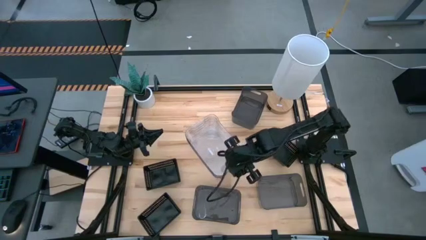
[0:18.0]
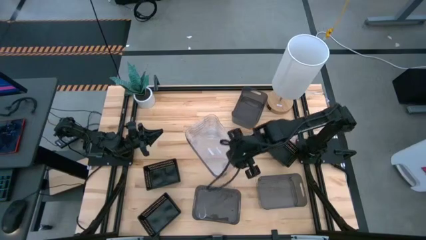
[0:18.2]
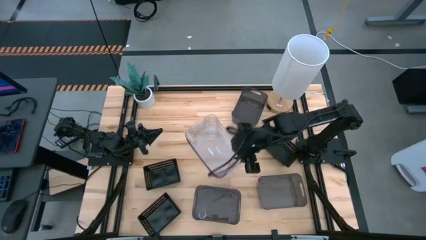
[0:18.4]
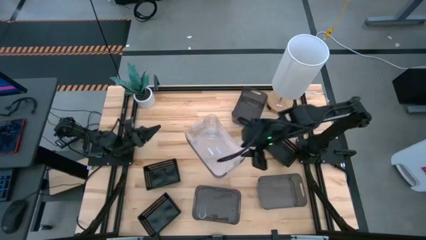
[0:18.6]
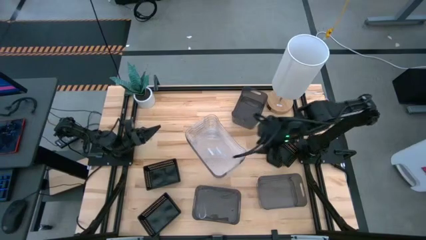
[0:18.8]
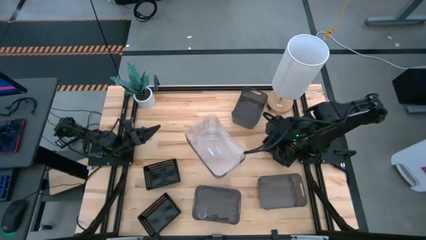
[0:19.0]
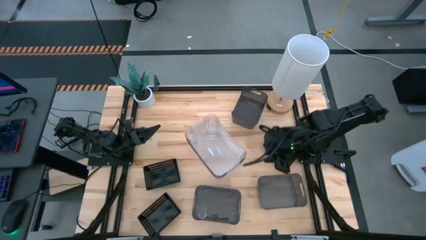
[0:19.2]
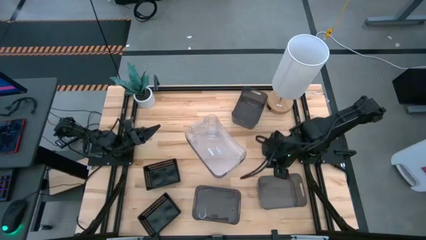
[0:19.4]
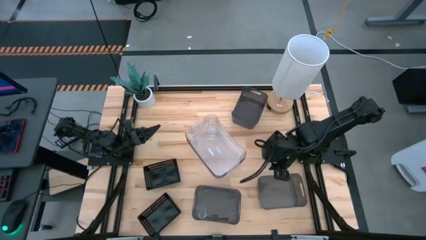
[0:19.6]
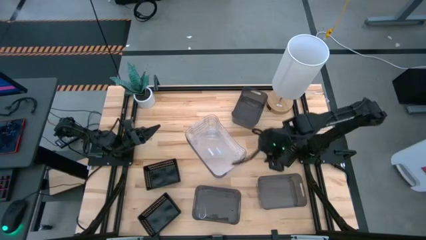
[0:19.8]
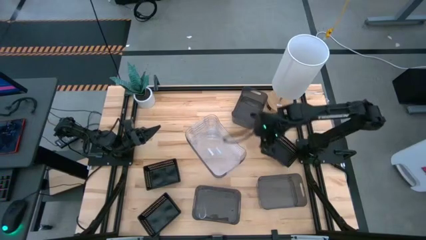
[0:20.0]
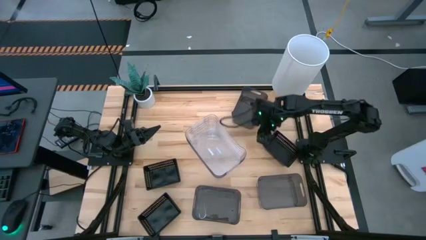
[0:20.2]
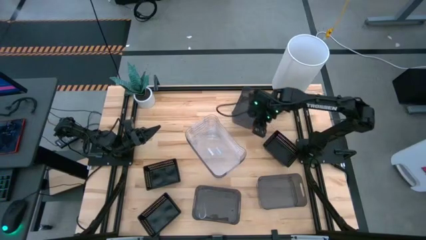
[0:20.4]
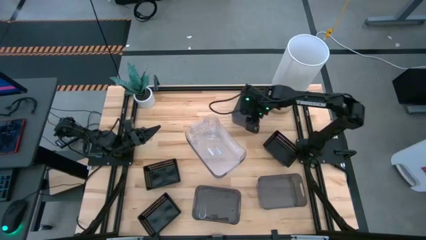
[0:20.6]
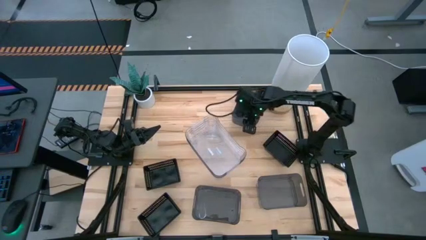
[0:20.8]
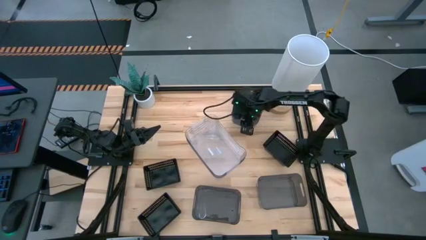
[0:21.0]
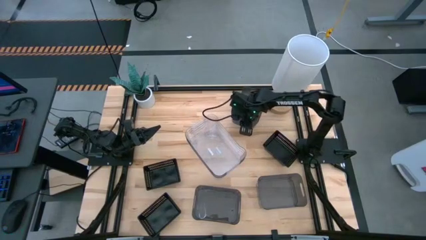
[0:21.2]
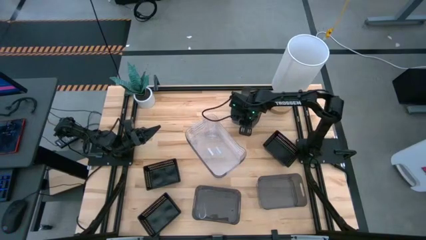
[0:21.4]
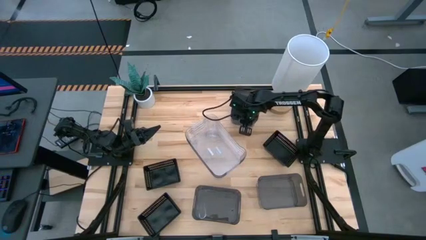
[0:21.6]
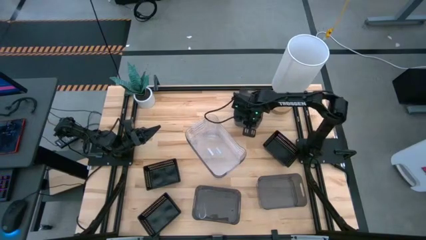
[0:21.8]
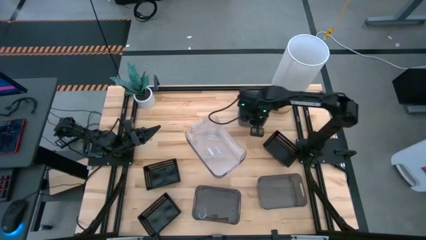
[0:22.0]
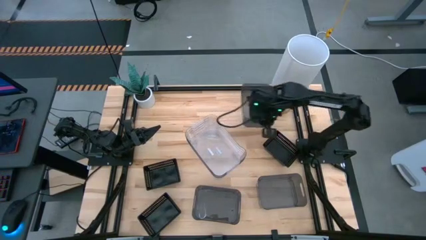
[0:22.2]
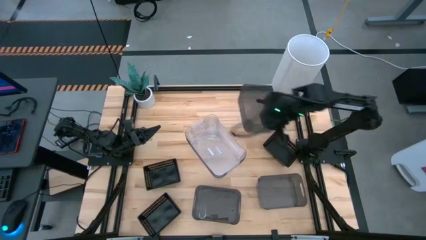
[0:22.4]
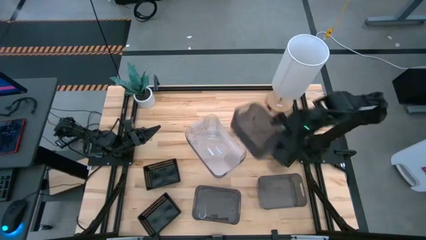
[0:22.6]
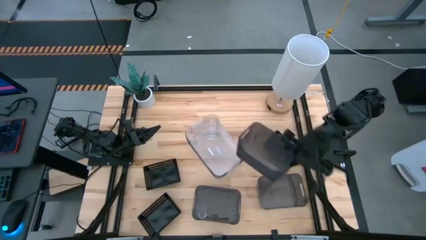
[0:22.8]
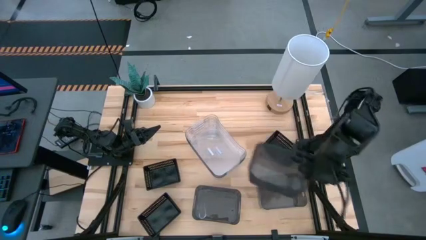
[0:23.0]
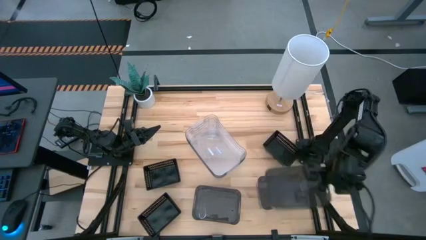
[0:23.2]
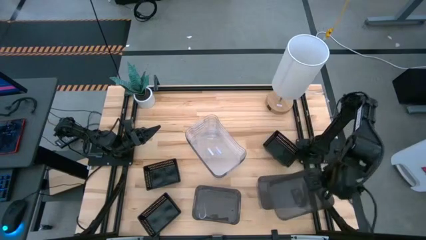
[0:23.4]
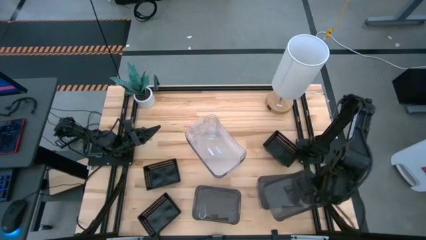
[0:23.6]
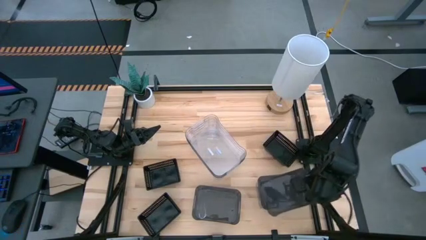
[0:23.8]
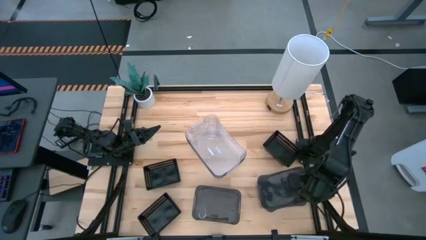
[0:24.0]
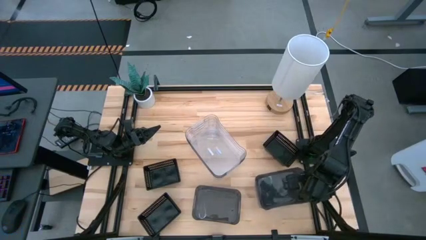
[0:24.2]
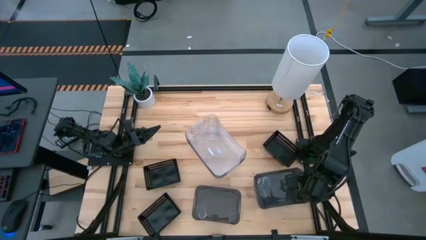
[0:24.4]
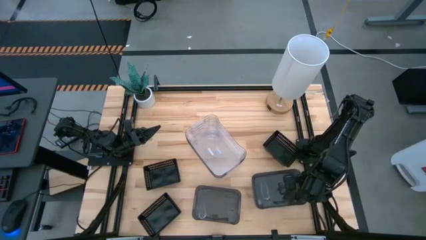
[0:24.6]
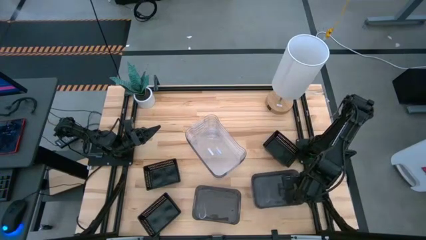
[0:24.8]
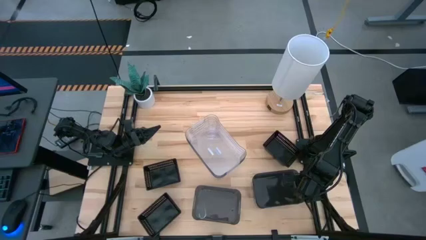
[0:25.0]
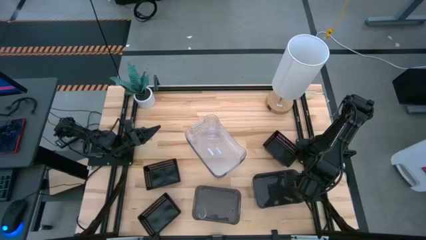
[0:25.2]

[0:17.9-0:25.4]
Stack the top black transparent bin on top of the bottom right black transparent bin

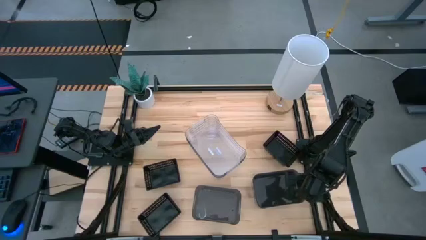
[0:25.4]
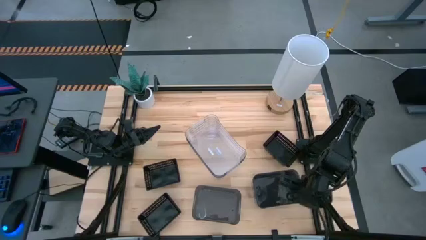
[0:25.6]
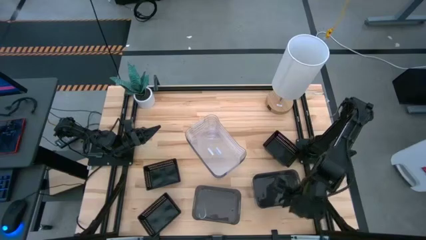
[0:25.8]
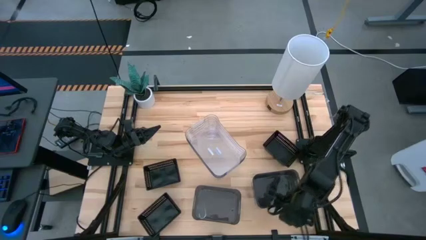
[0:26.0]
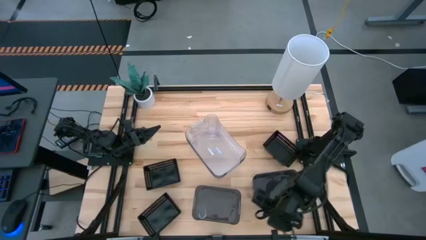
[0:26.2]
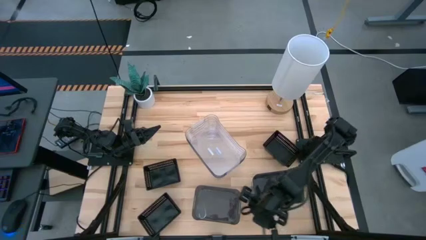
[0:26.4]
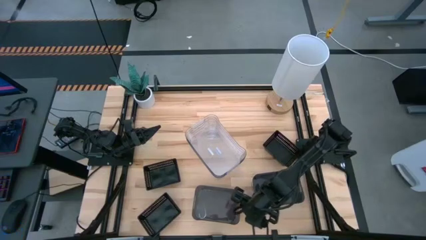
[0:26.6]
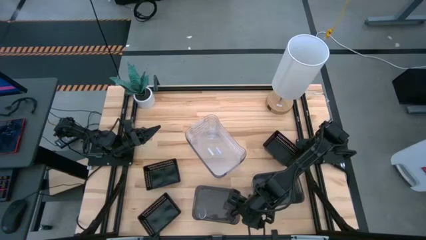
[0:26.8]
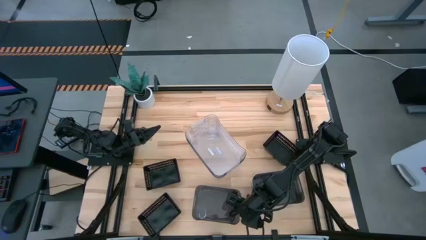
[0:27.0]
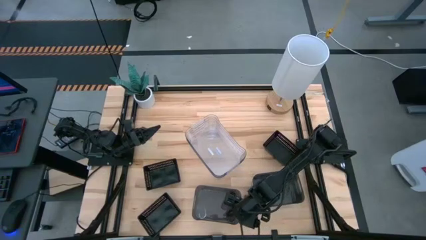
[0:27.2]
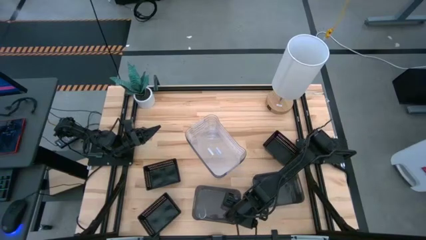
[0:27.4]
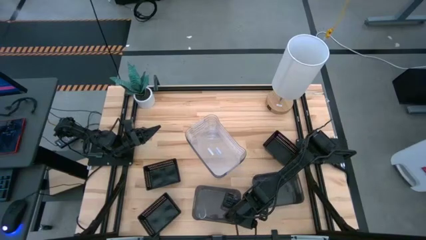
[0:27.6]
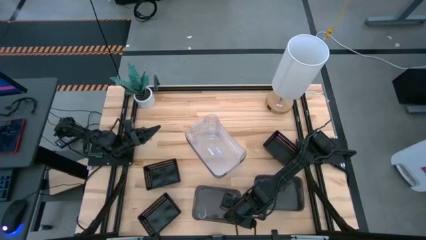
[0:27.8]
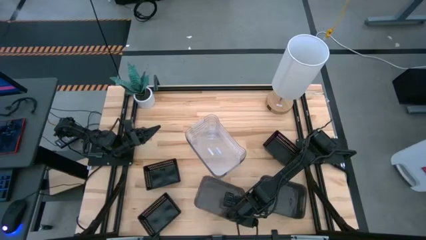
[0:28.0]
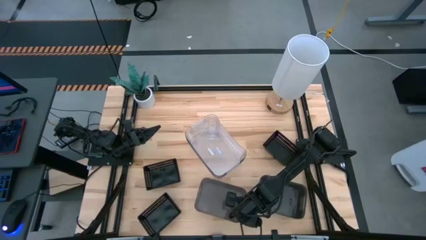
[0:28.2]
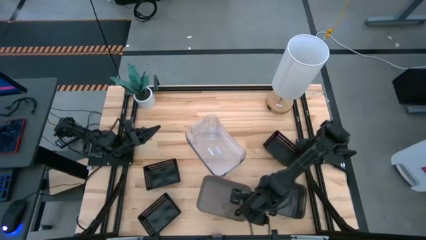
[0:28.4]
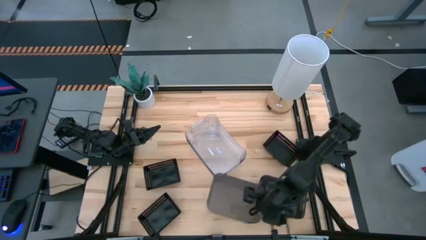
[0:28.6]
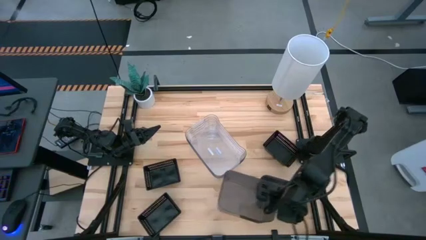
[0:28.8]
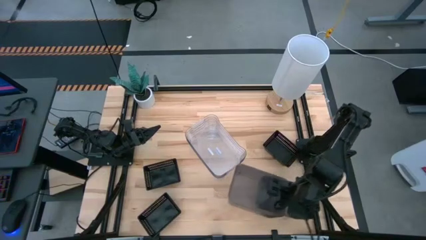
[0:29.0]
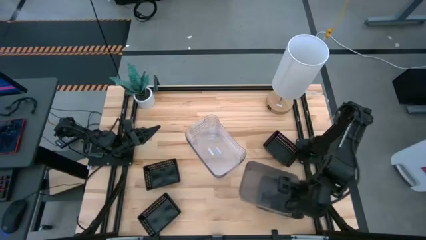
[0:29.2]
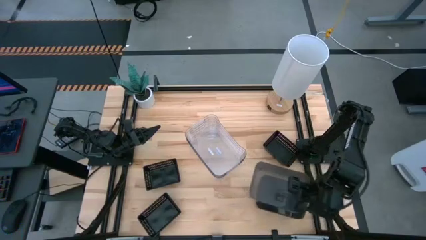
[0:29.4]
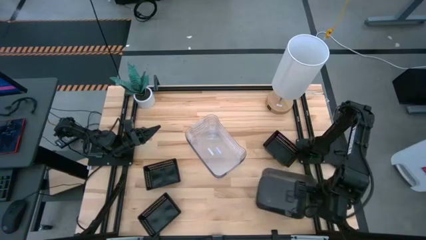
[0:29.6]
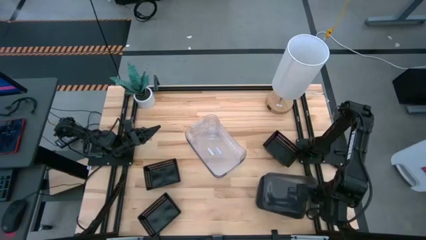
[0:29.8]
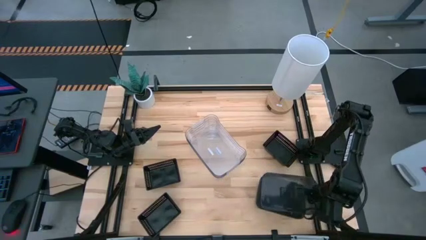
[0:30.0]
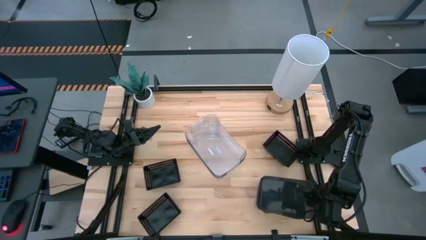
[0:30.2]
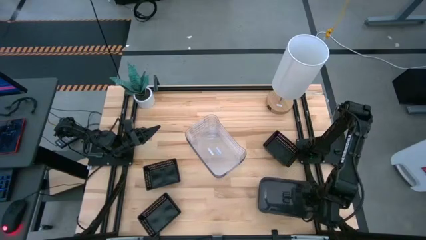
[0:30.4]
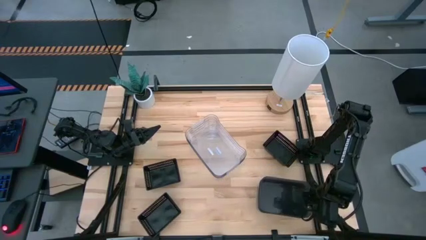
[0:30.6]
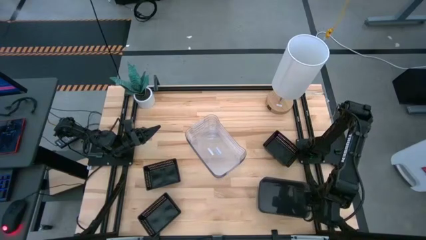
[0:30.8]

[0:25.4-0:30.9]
Stack the left black transparent bin on top of the right black transparent bin
